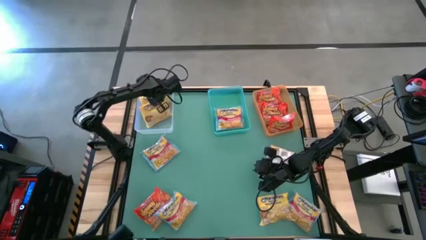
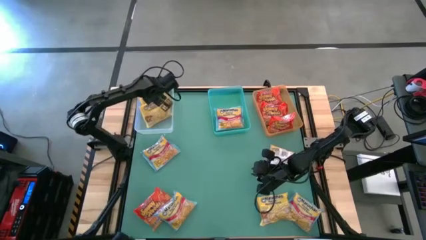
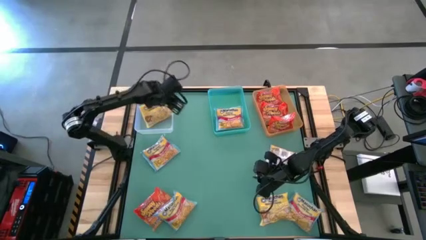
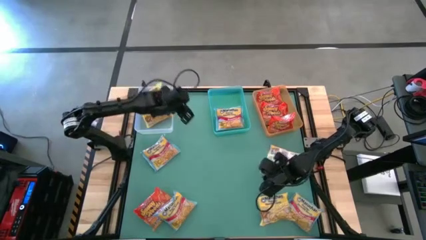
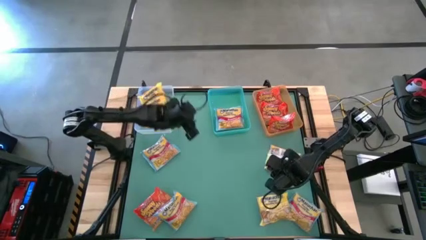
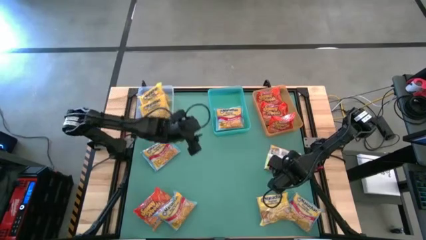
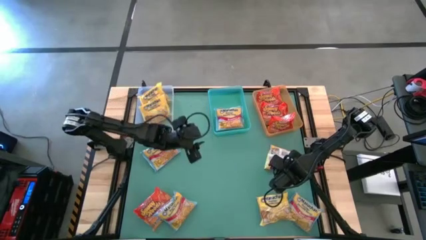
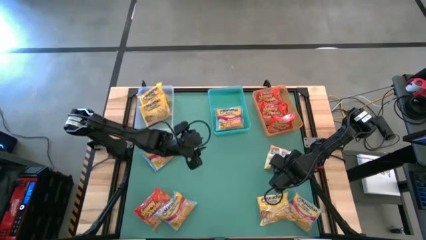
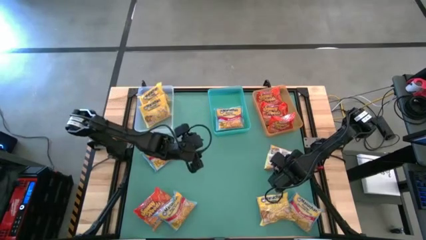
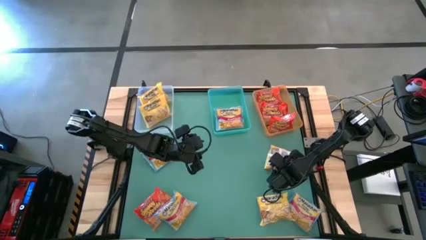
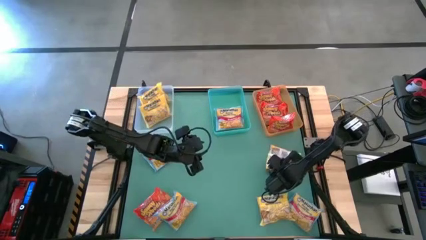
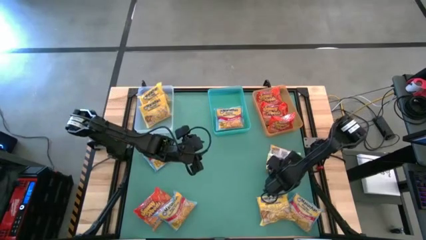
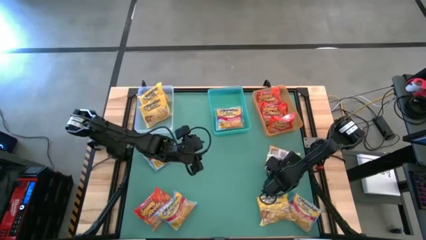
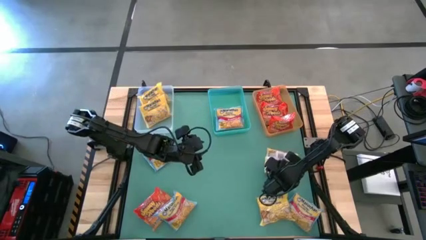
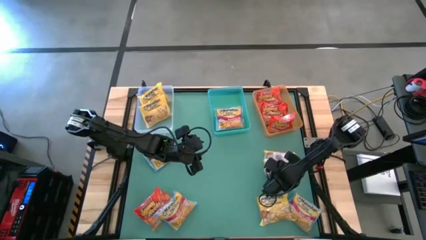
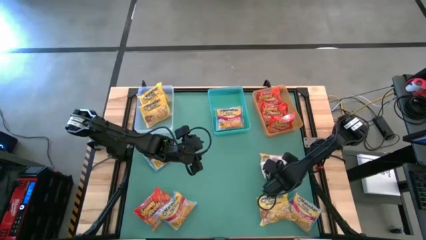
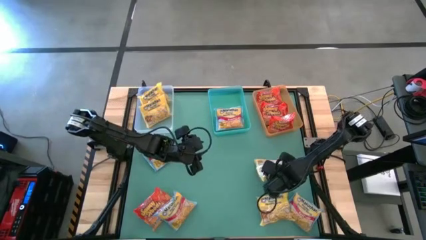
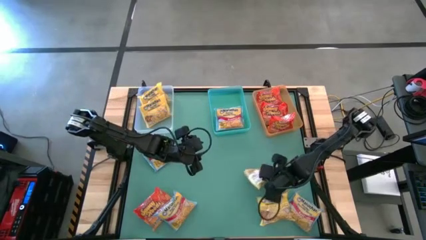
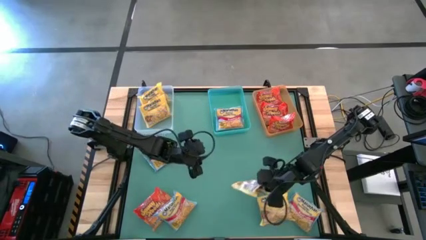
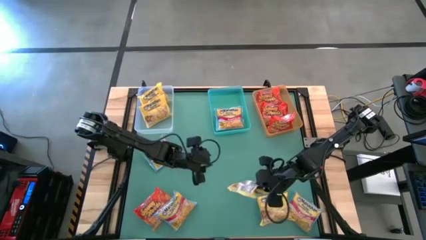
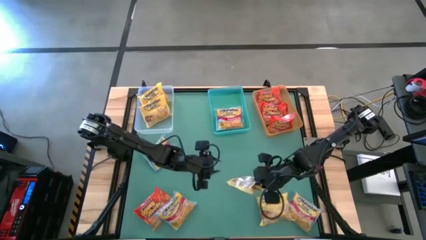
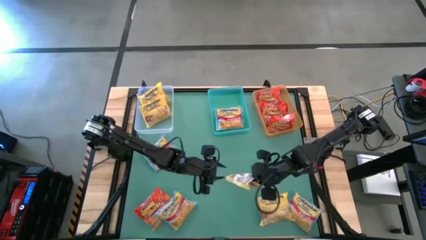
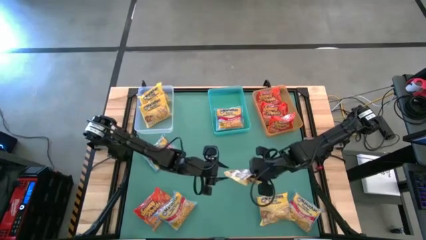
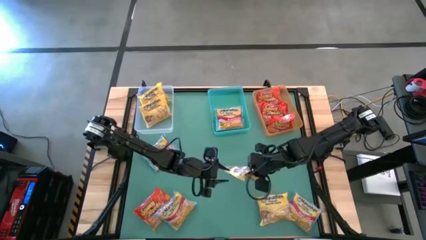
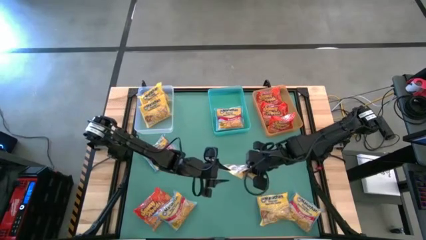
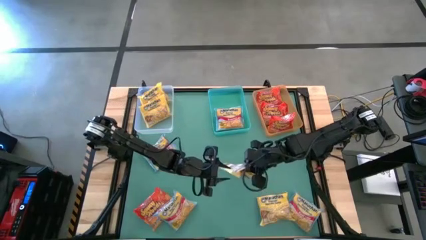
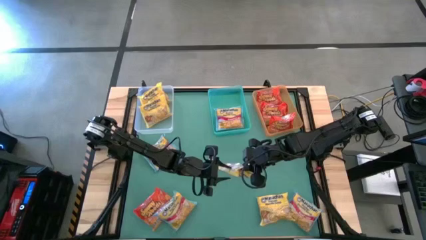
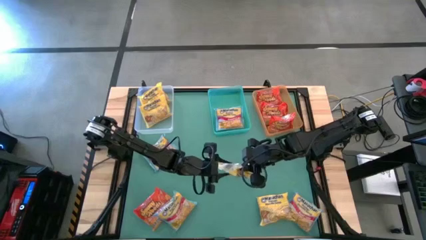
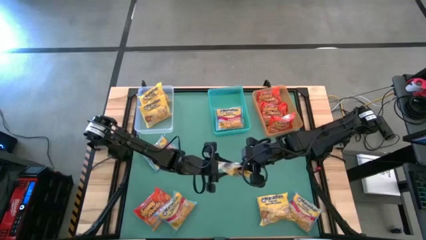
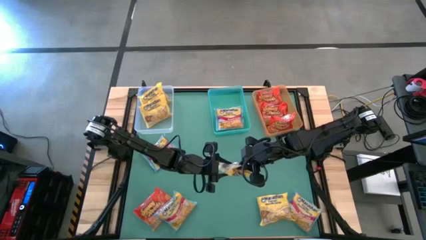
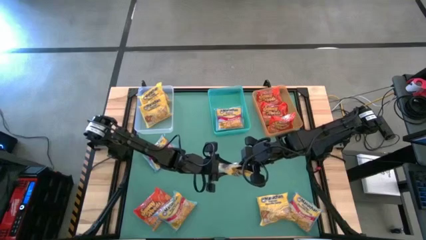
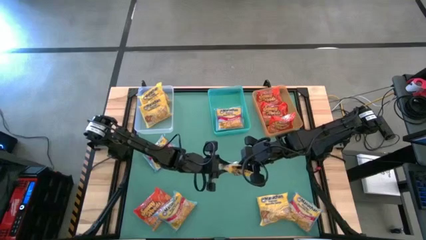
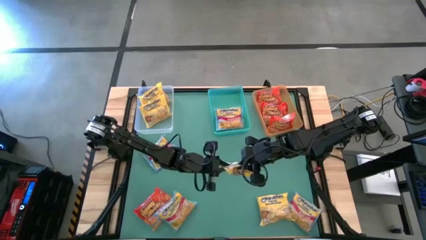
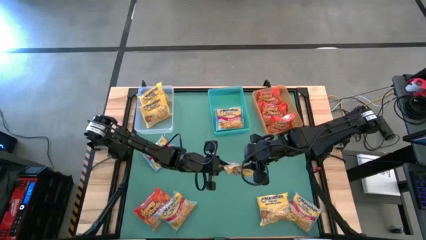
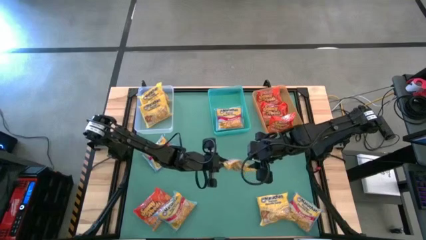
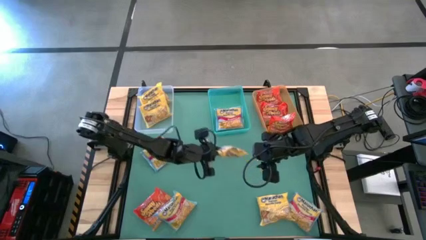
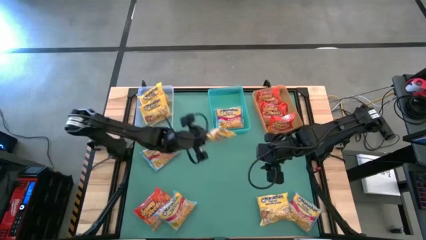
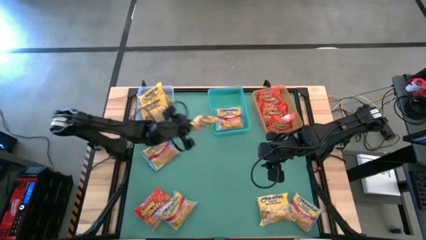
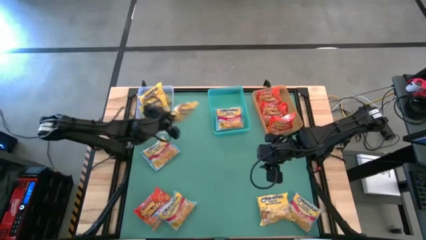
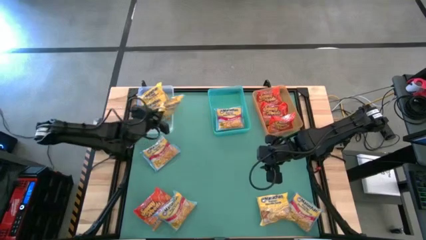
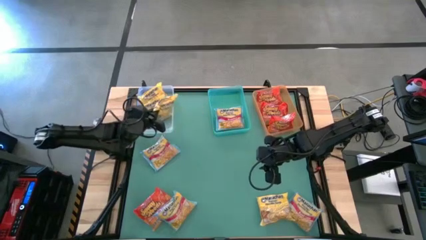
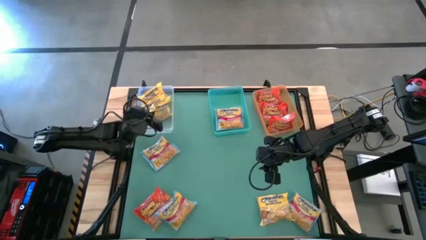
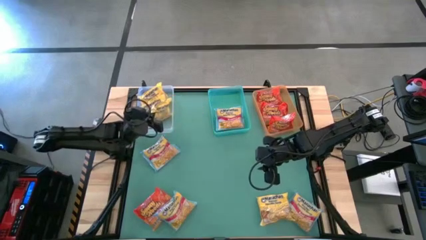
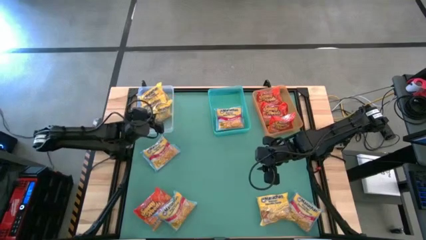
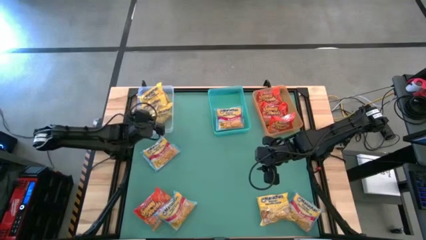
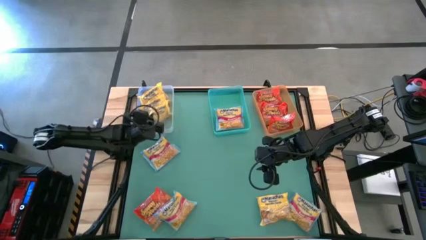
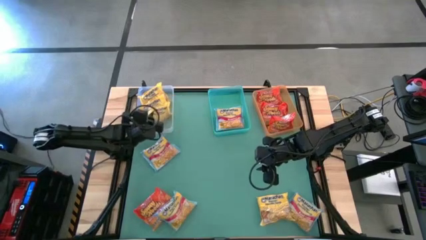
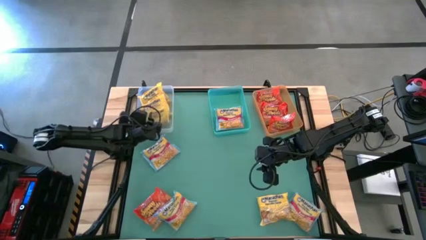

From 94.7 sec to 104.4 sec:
Task: Sort Maruchan noodles
Put the yellow noodle pack into the white bin
